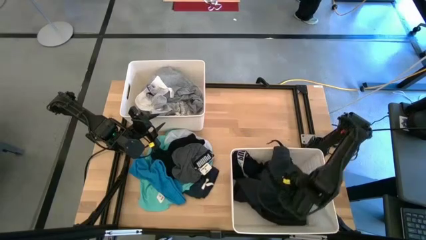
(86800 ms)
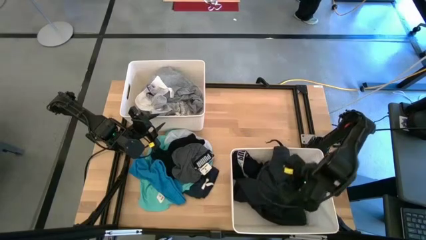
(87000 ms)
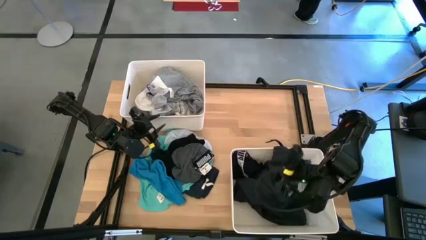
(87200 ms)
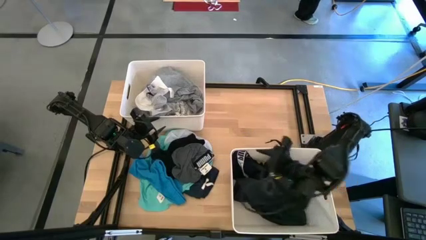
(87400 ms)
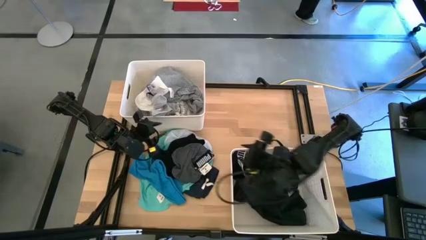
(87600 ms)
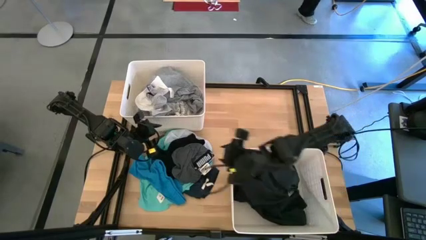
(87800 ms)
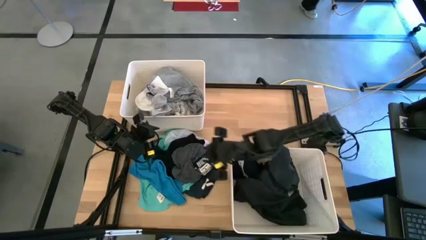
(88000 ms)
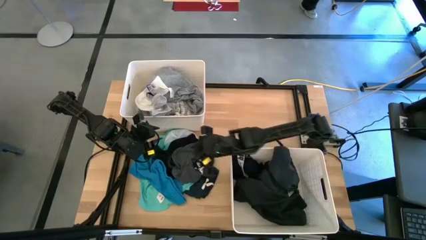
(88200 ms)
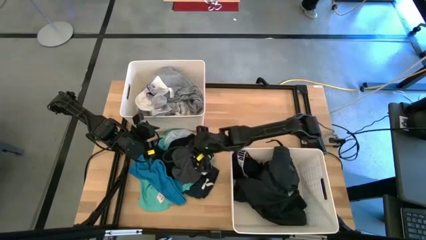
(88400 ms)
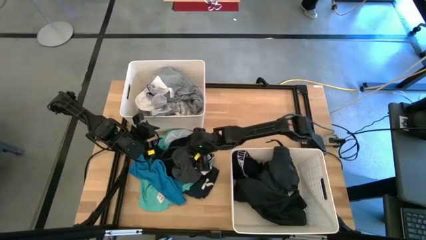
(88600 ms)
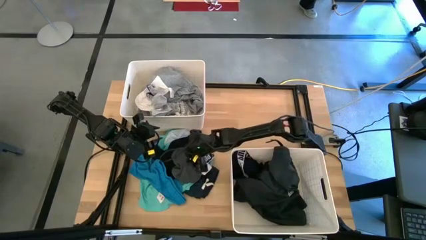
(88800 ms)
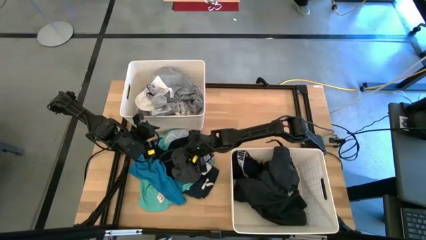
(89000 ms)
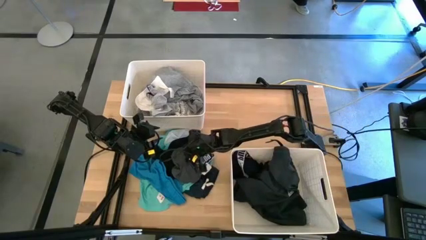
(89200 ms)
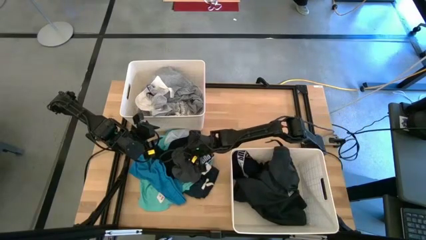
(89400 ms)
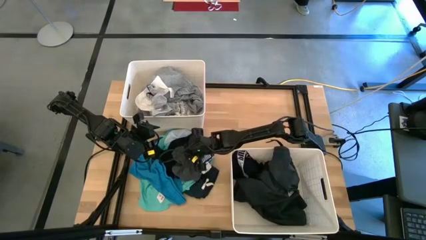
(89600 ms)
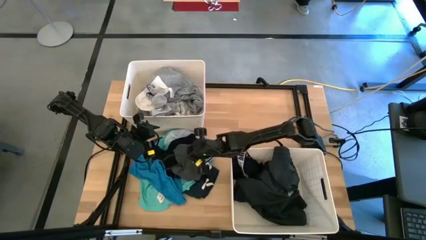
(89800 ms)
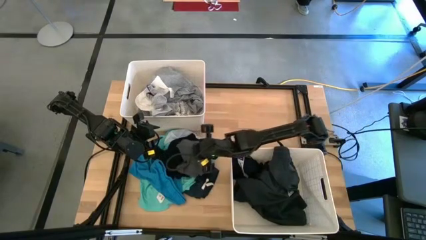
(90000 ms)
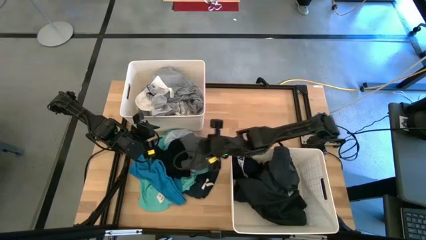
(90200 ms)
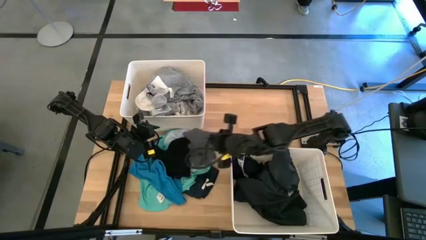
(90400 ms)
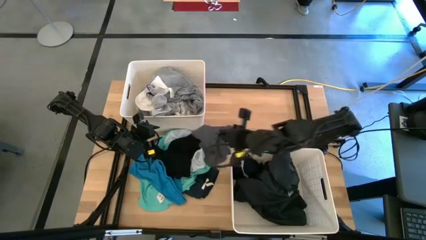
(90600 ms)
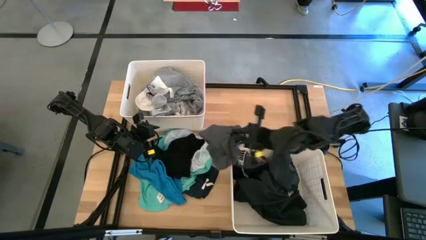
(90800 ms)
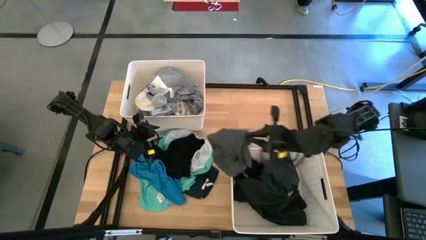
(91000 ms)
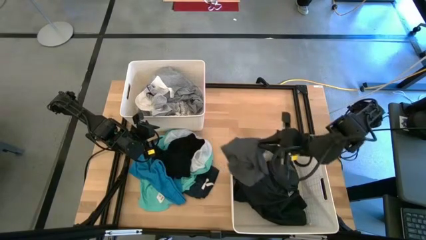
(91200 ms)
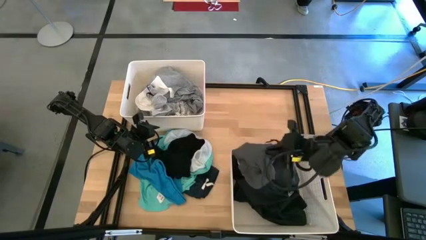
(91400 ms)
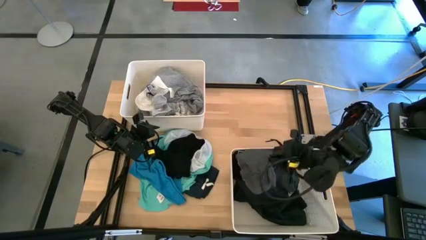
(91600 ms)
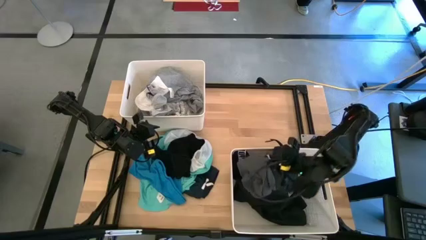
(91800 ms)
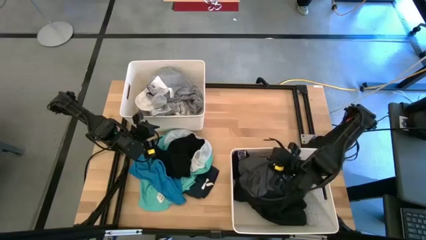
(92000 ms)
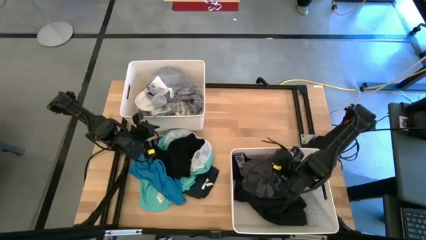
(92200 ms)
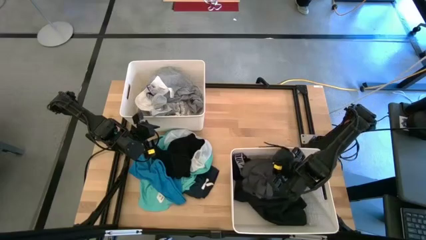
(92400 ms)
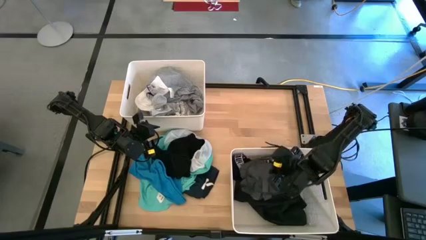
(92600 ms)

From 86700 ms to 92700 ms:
Task: Sort clothes
Put the gray underwear into the bottom right laundry bin

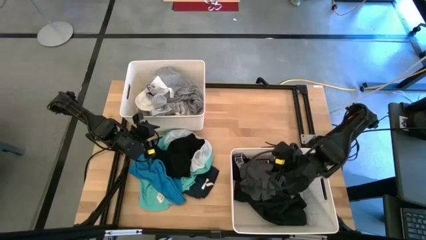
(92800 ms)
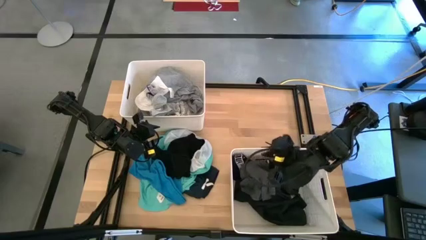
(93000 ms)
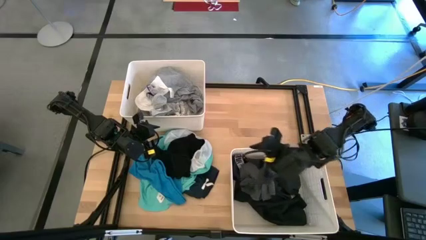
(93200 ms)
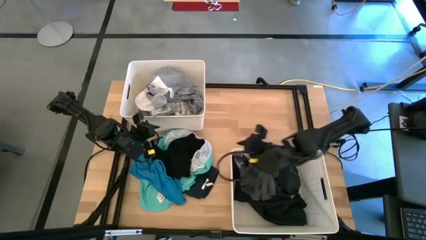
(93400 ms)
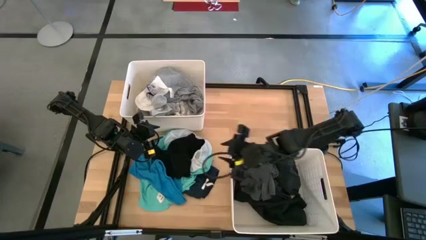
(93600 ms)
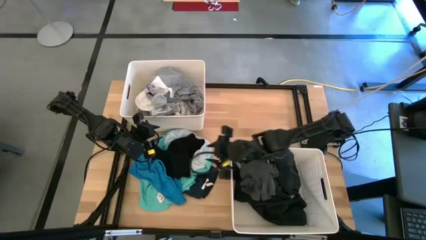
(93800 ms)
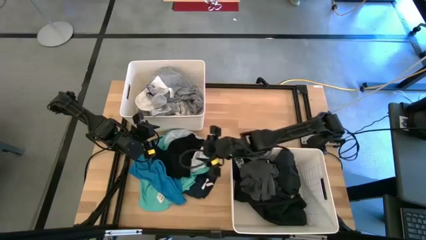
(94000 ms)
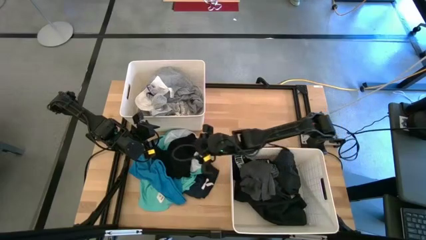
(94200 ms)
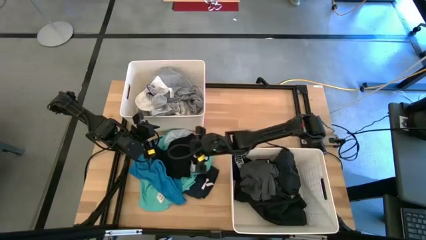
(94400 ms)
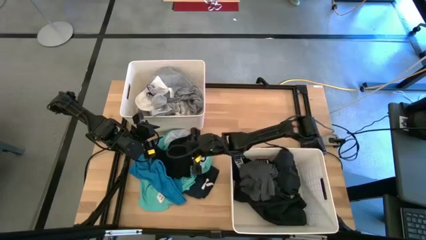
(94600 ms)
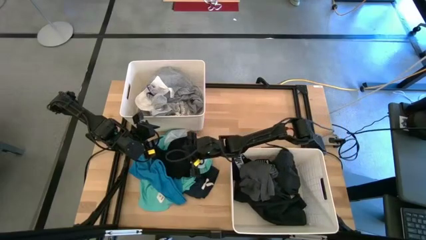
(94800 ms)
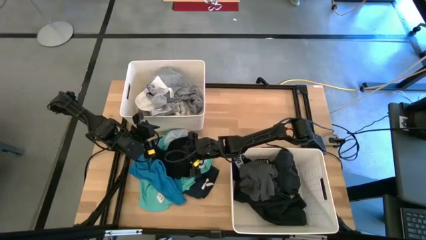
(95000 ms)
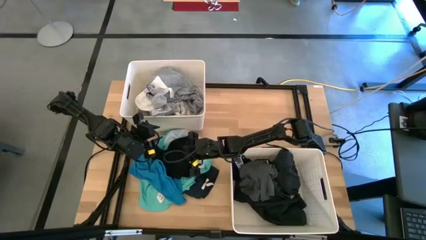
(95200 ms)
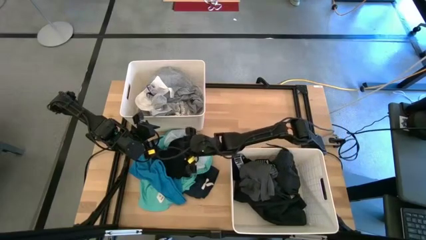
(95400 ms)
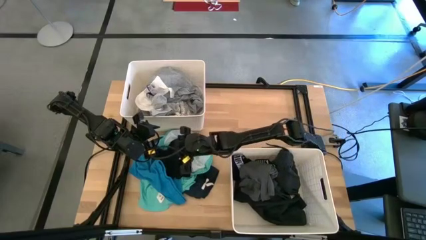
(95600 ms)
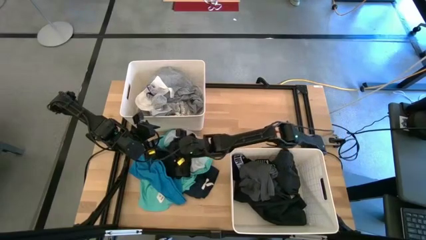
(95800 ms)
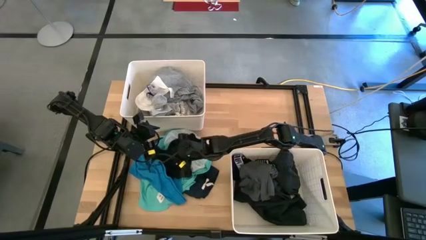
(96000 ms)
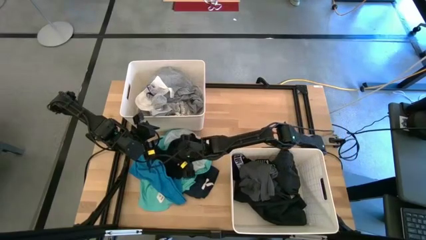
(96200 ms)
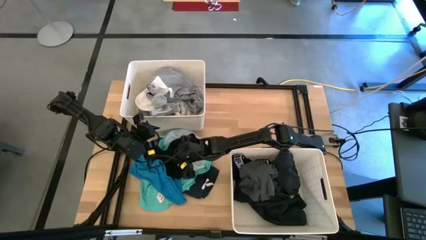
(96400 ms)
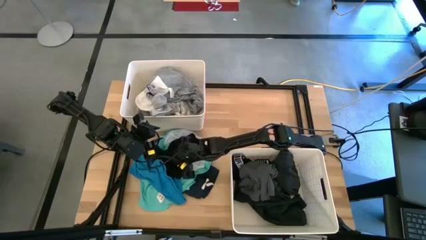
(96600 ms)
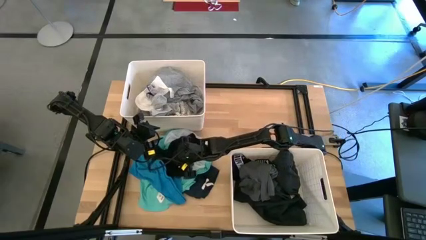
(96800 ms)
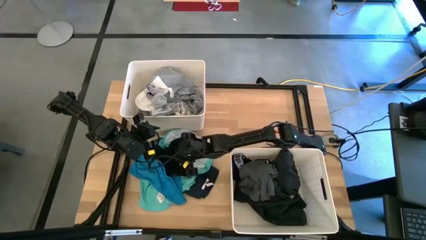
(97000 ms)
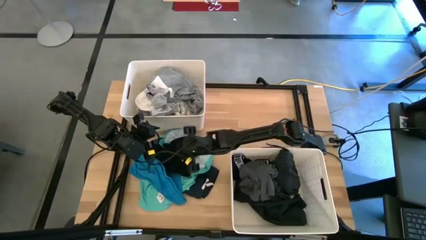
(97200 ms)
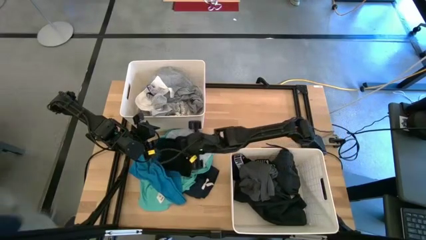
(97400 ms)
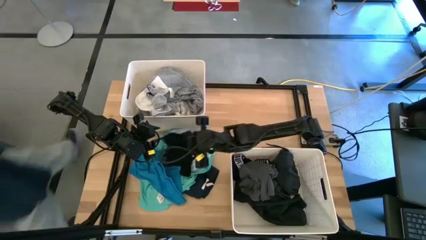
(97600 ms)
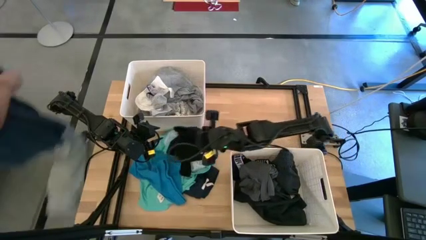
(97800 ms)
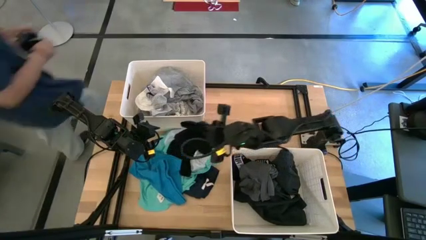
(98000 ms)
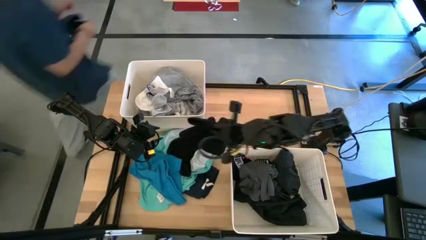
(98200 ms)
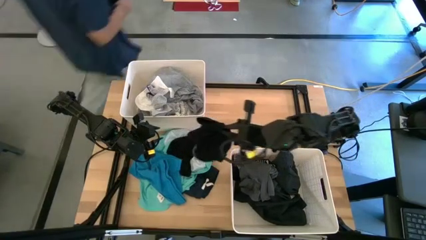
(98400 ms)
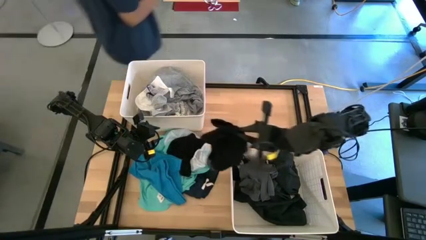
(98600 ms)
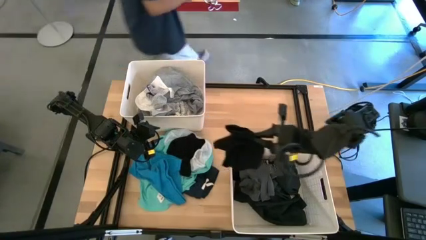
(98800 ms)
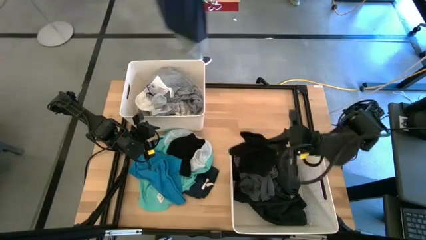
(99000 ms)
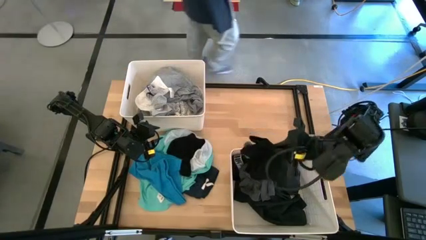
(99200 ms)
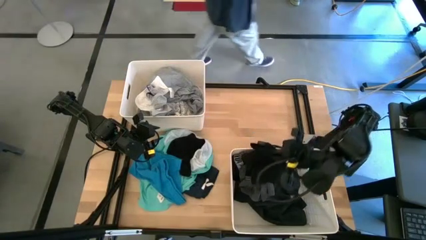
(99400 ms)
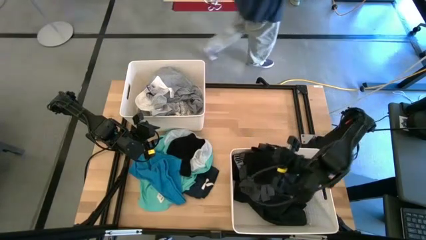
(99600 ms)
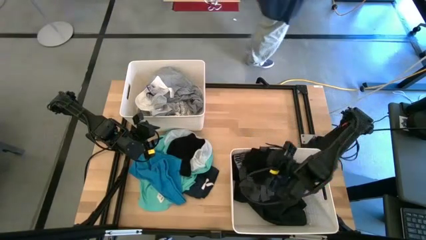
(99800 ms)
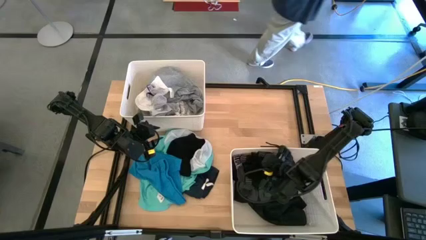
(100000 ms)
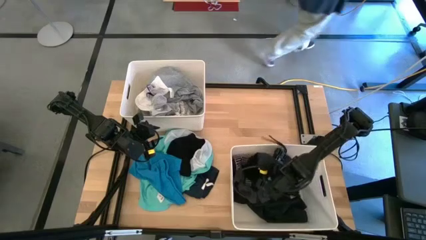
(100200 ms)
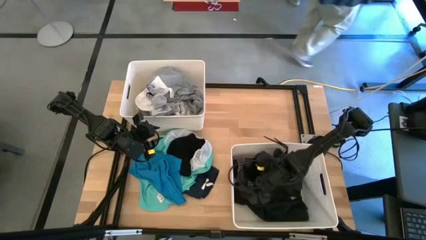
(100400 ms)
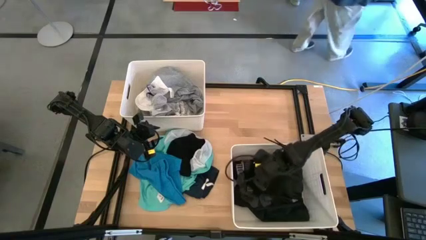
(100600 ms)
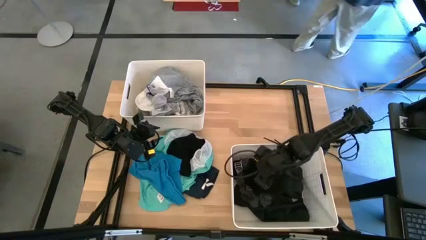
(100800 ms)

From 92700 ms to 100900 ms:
Put the black underwear into the bottom right laundry bin
